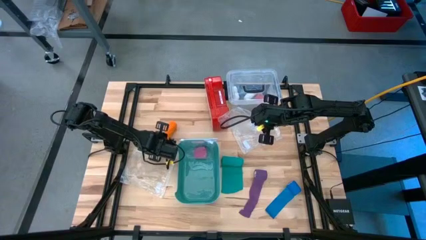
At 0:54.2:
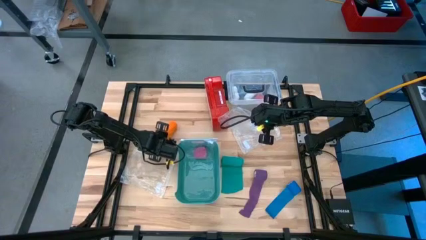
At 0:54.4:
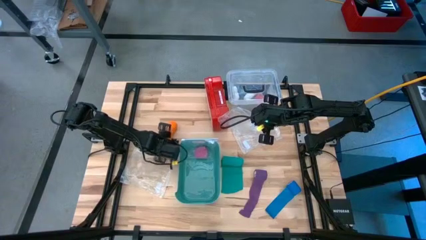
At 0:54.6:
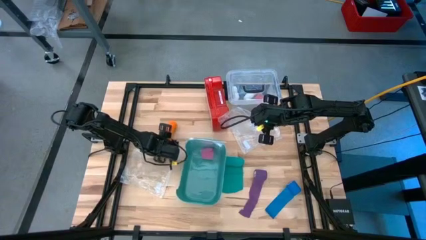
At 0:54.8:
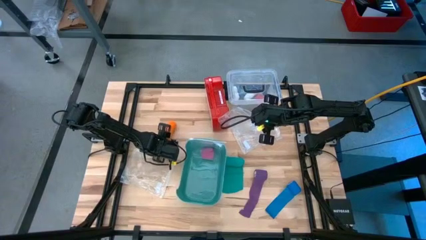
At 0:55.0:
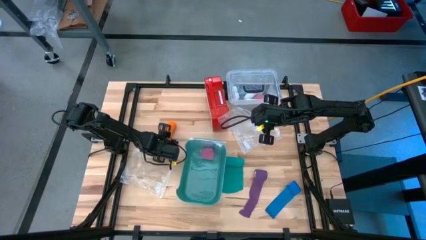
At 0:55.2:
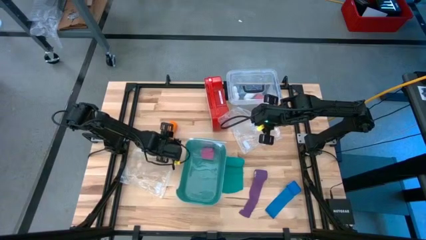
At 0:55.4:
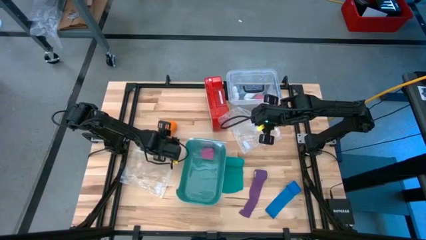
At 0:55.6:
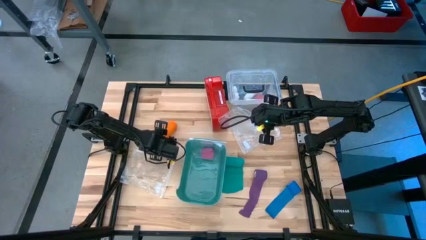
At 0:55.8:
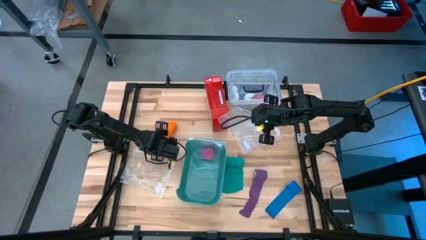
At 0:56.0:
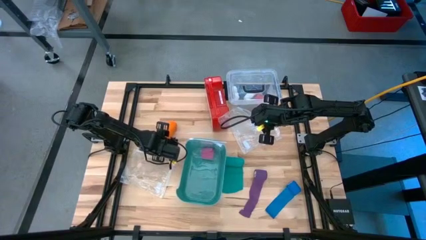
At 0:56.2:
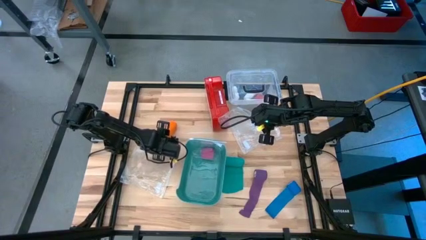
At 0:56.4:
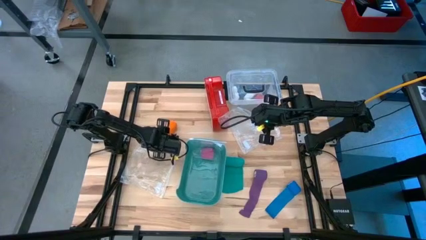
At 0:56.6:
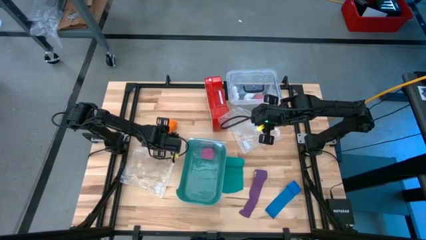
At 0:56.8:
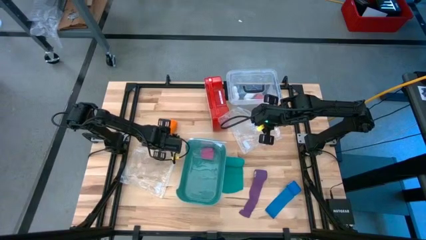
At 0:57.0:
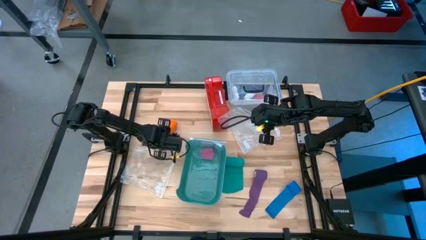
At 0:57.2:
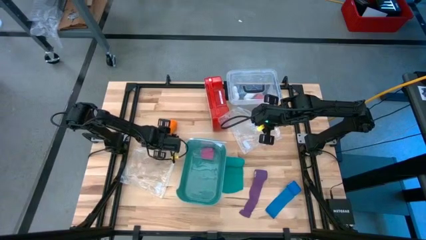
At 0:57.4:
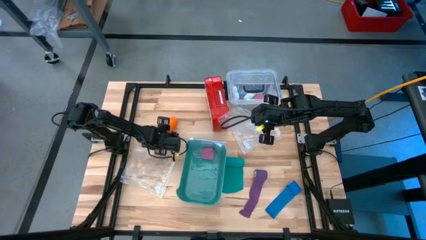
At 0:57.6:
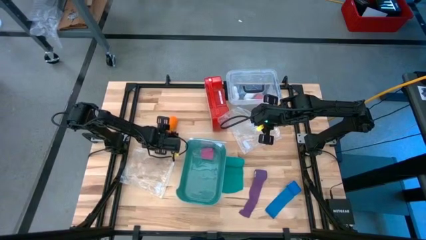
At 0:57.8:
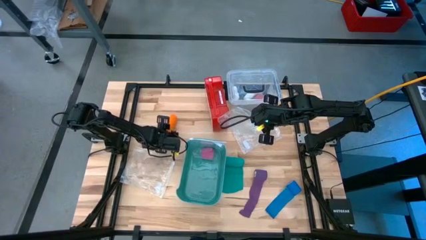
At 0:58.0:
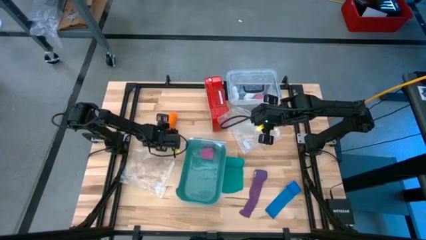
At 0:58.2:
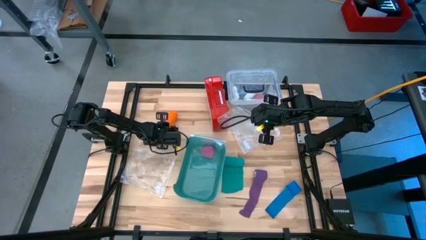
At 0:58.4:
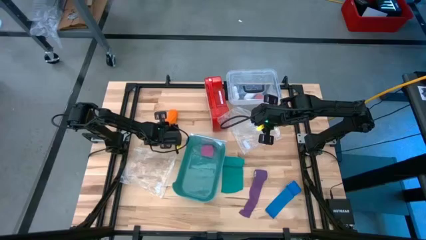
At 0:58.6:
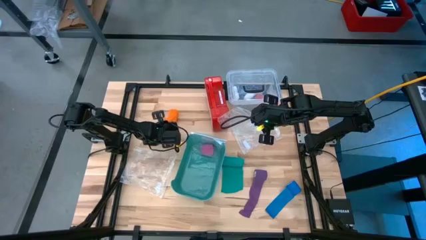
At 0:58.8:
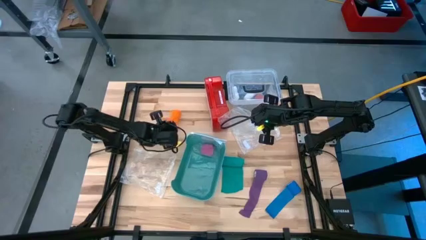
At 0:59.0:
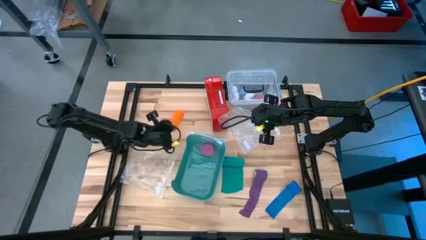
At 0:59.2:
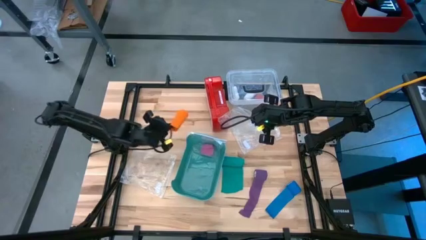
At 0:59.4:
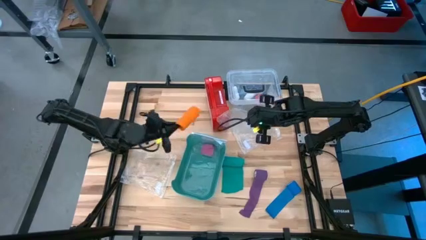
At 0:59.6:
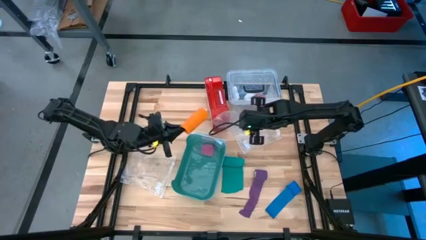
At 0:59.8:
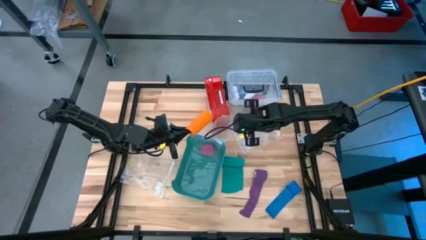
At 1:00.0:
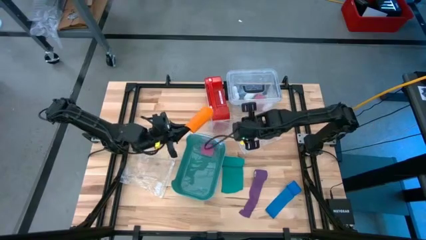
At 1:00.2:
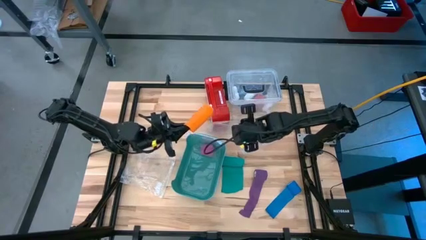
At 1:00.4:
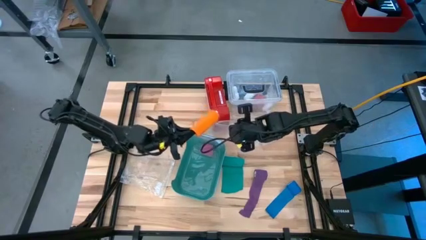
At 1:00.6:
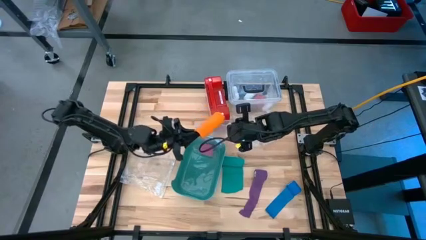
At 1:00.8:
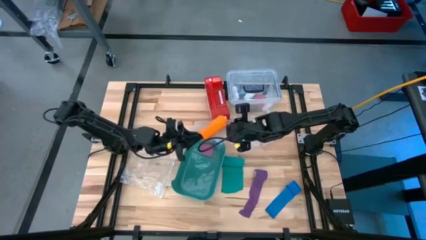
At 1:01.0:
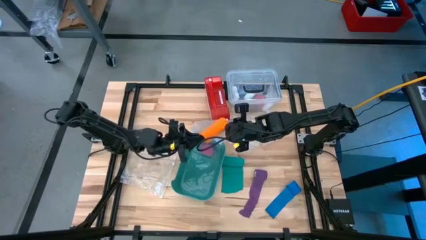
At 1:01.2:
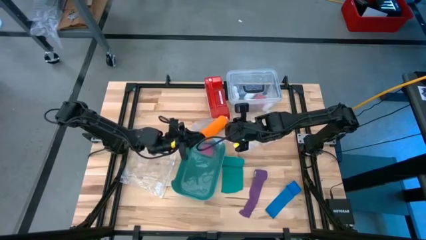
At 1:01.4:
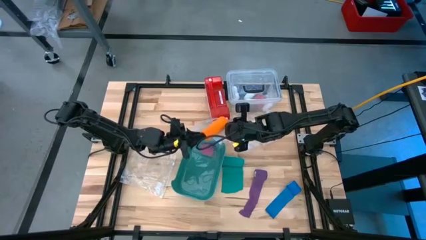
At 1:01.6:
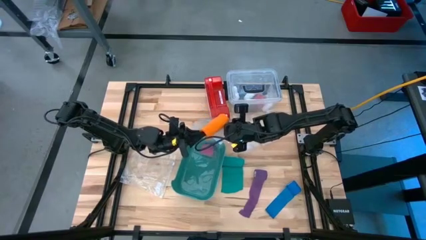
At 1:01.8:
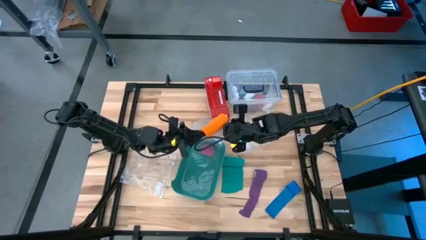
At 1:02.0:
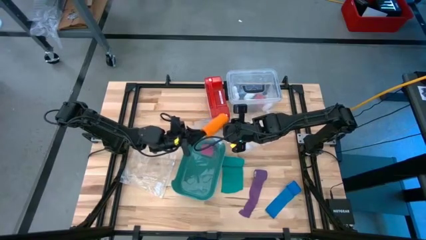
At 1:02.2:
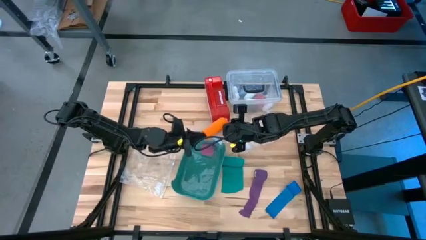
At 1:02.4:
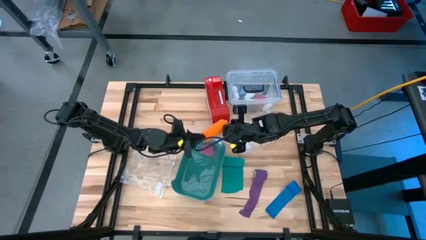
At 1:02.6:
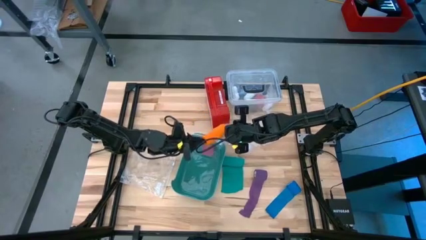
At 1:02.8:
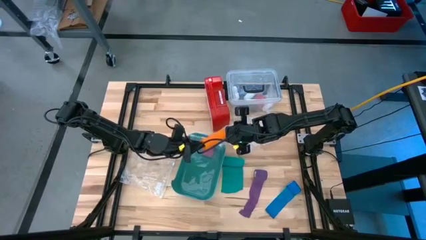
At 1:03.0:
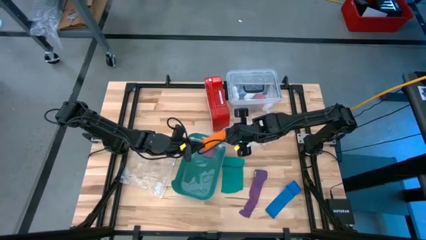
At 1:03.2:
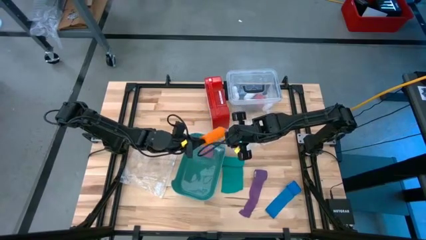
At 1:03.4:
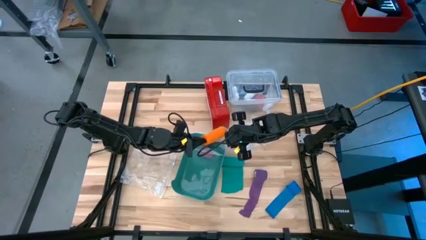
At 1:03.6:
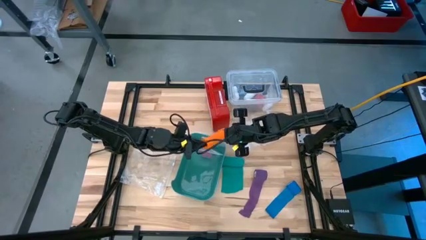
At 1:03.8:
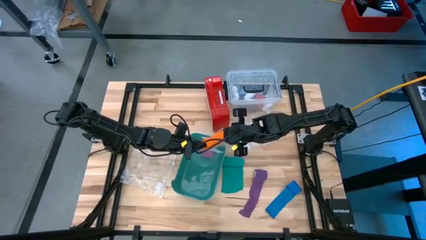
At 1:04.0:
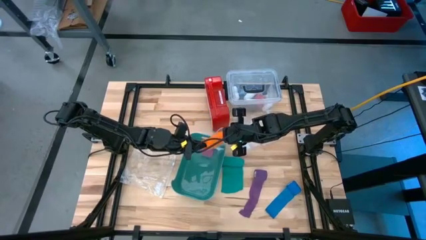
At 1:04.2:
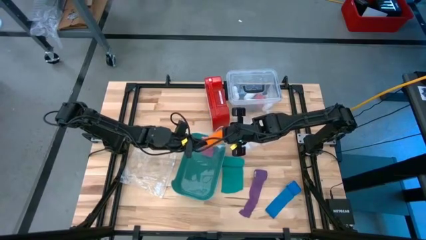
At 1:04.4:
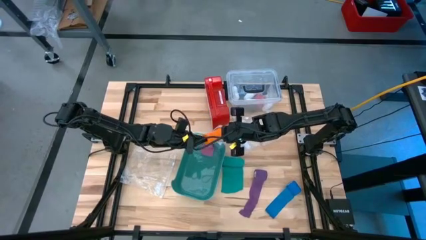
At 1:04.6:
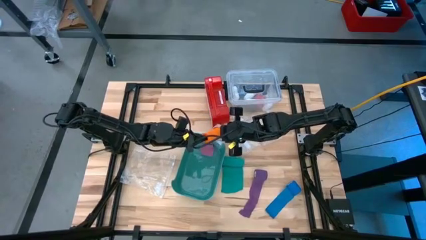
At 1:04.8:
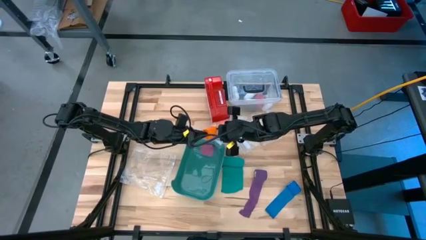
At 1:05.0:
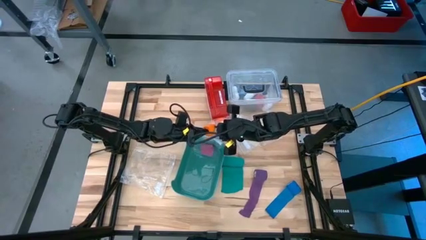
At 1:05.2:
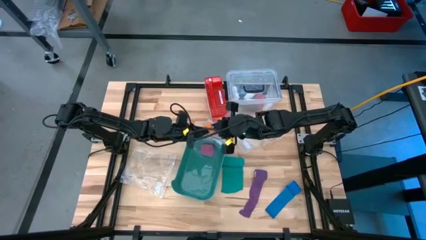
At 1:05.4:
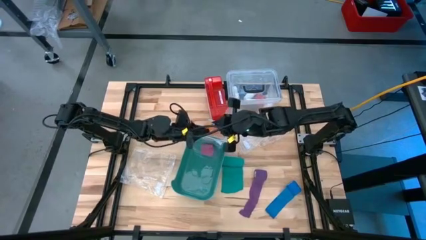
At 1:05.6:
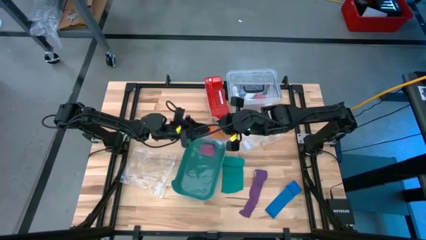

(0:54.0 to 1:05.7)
Task: Roll bandage
Put the orange bandage into the transparent zip bag

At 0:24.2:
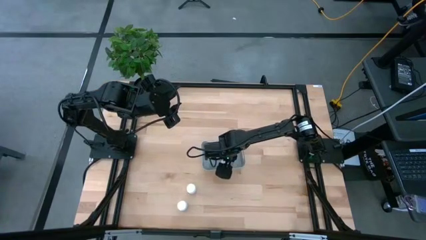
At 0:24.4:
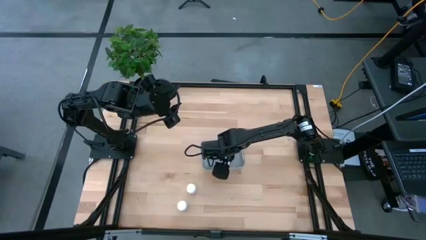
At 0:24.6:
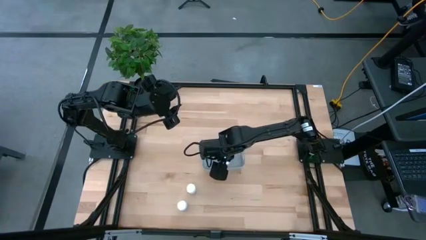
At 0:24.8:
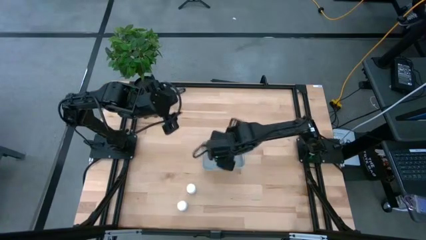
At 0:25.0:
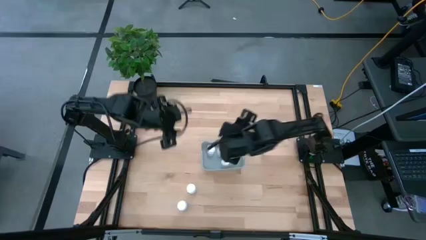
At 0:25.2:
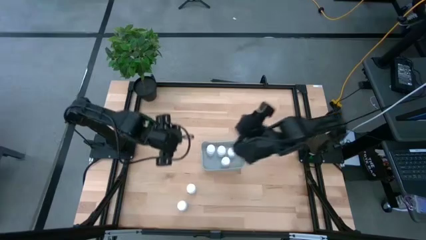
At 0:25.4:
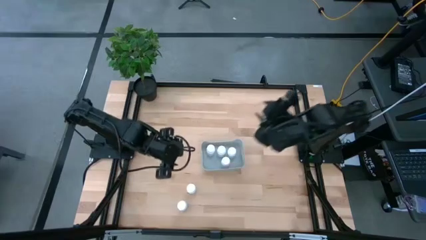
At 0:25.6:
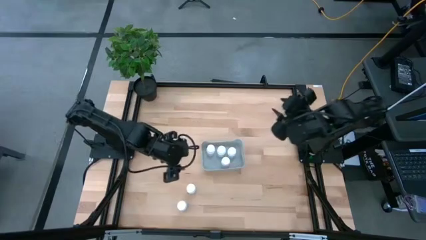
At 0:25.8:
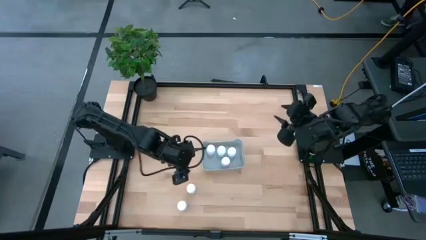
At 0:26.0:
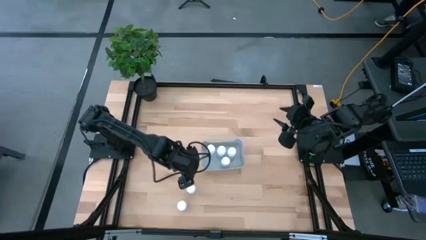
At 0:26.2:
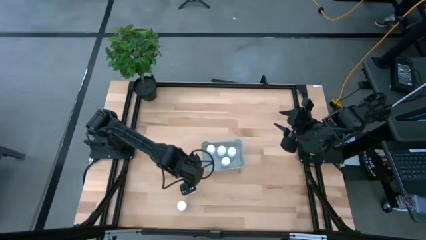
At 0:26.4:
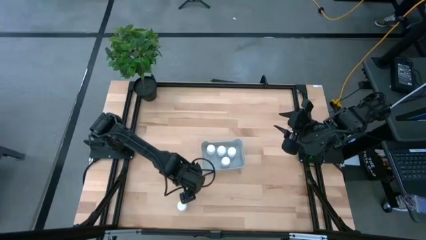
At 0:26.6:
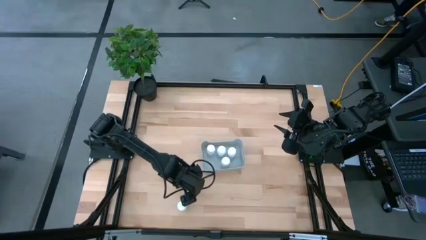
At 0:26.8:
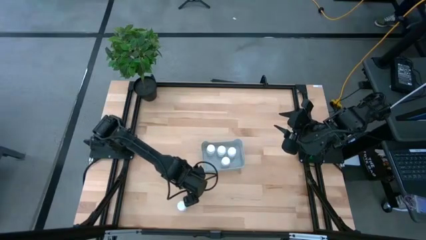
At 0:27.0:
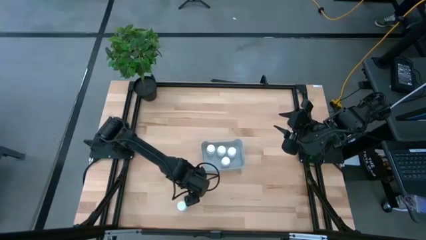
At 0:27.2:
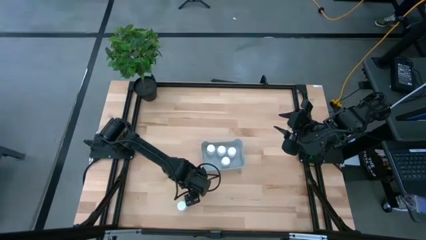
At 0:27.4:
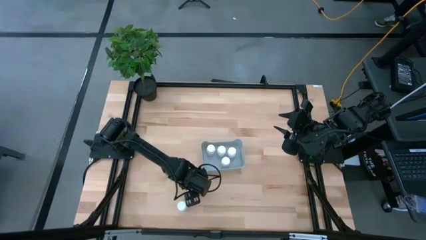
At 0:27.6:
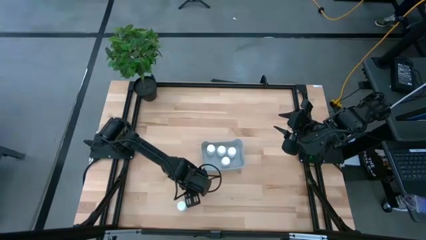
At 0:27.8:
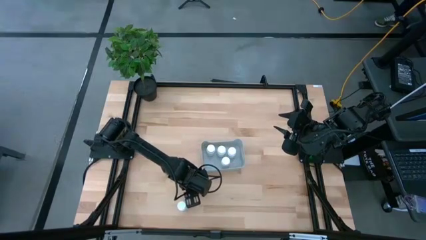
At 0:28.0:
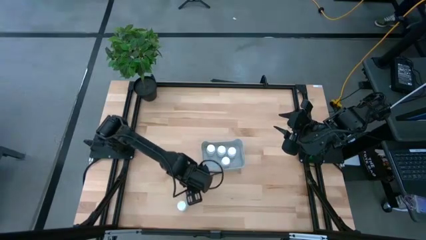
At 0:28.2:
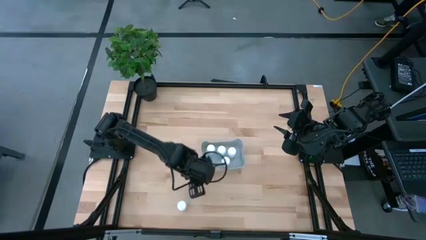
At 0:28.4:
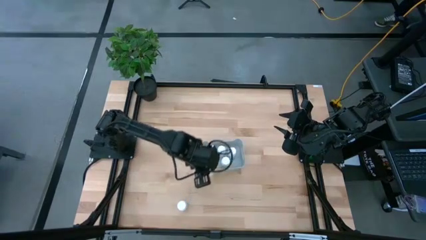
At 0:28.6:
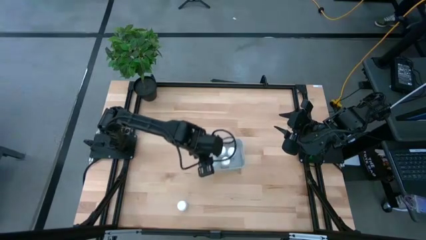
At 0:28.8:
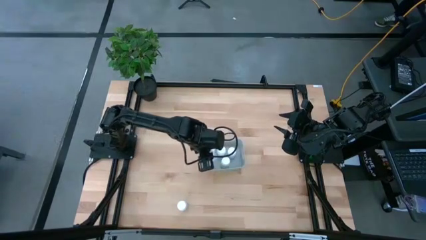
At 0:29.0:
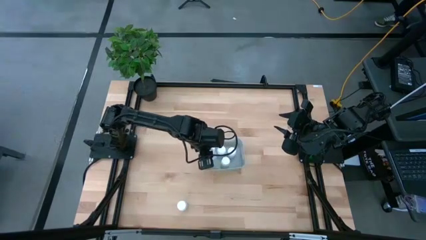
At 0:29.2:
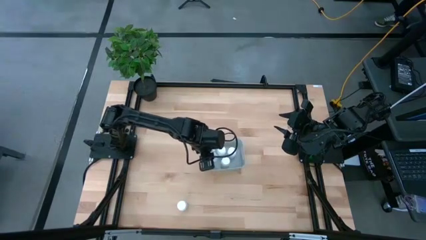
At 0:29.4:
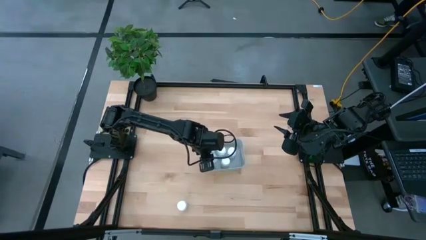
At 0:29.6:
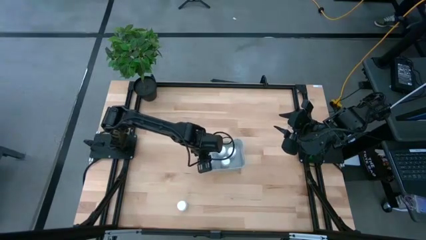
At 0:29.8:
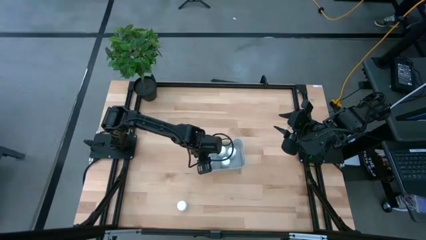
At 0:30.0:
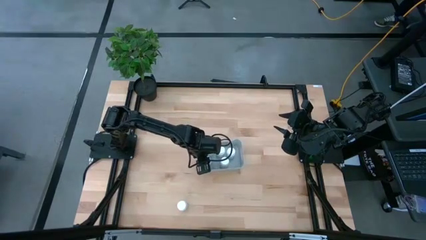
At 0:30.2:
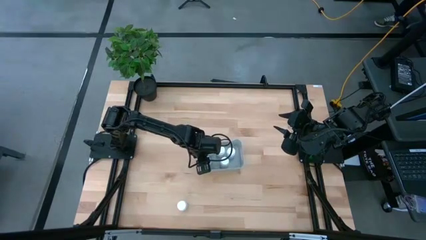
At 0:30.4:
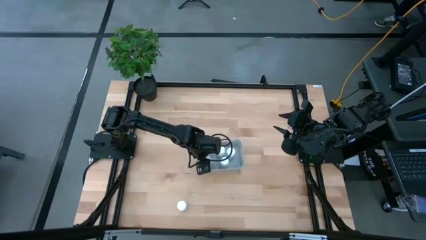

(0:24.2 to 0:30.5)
Task: Pick and place pill bottles into a basket
Put the white medicine bottle into the gray bin
